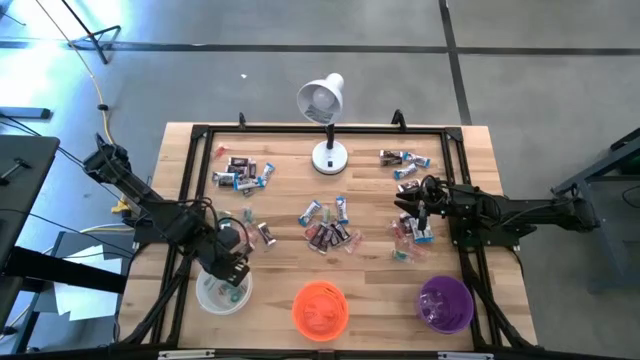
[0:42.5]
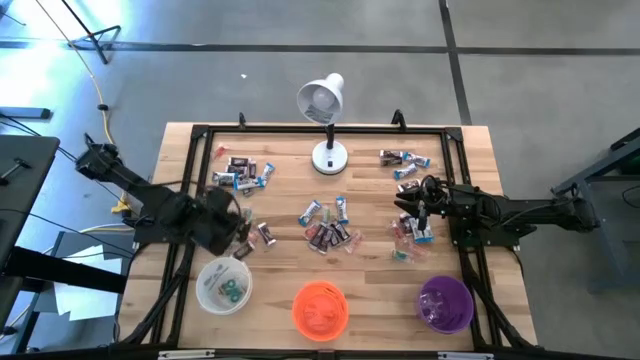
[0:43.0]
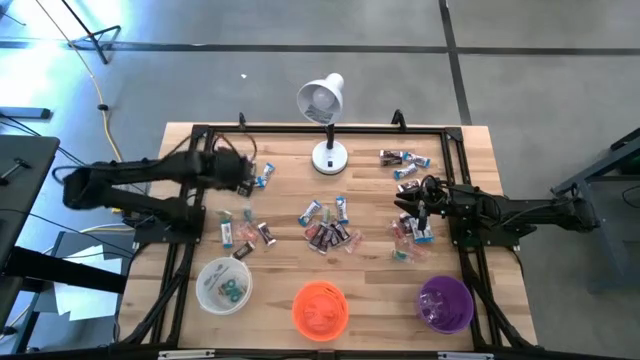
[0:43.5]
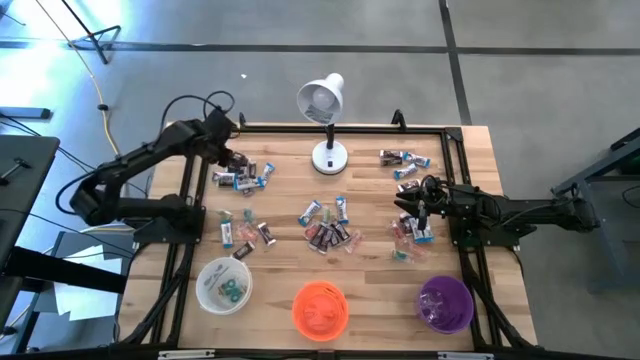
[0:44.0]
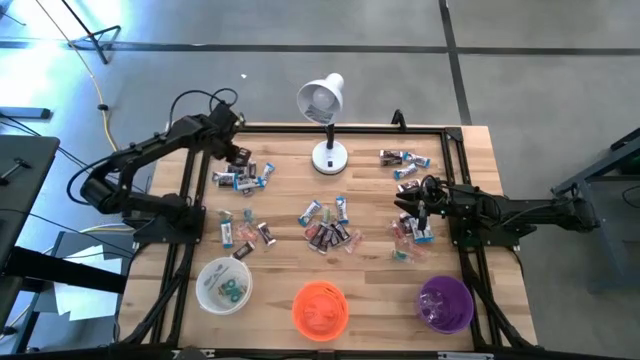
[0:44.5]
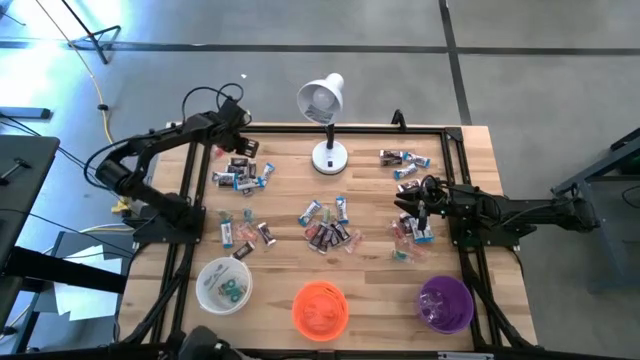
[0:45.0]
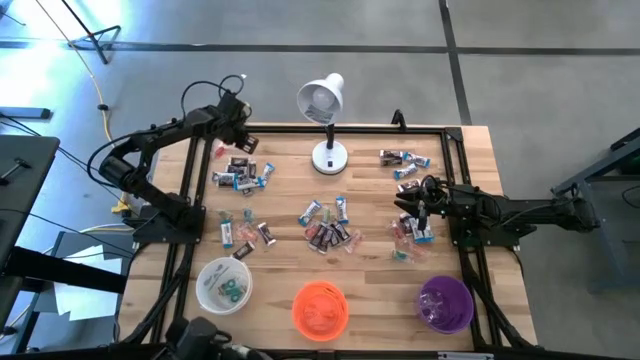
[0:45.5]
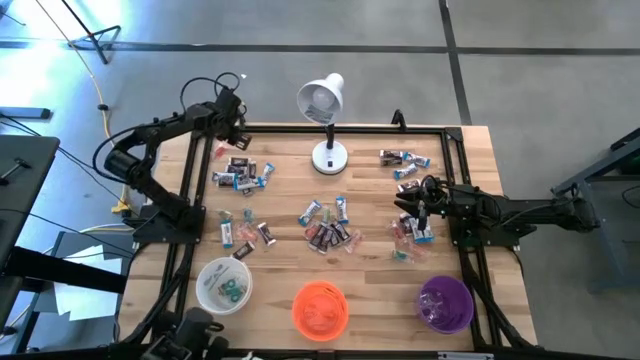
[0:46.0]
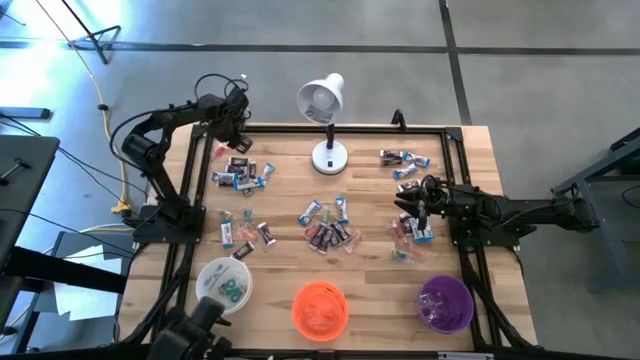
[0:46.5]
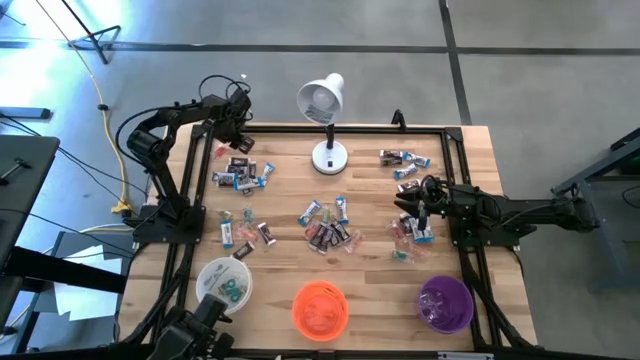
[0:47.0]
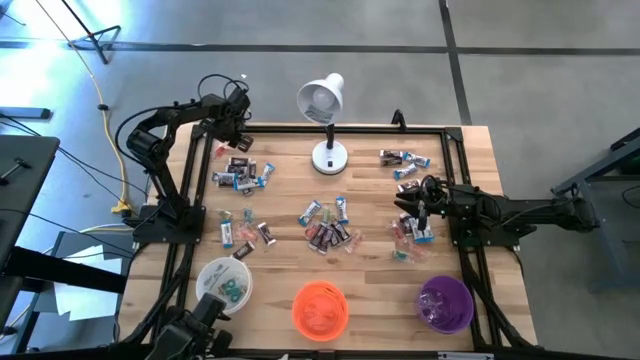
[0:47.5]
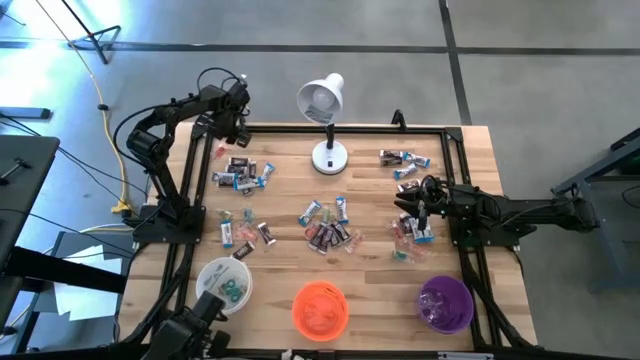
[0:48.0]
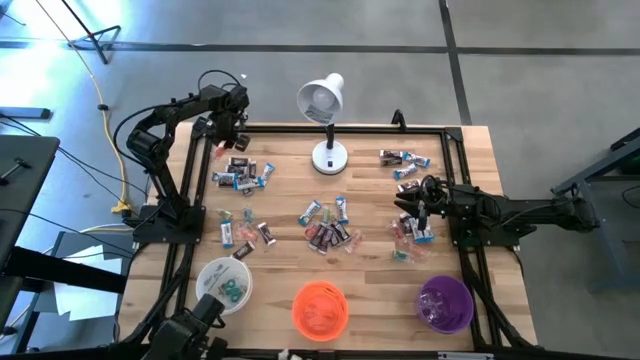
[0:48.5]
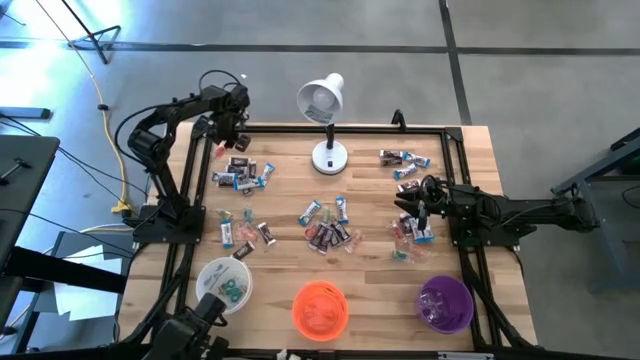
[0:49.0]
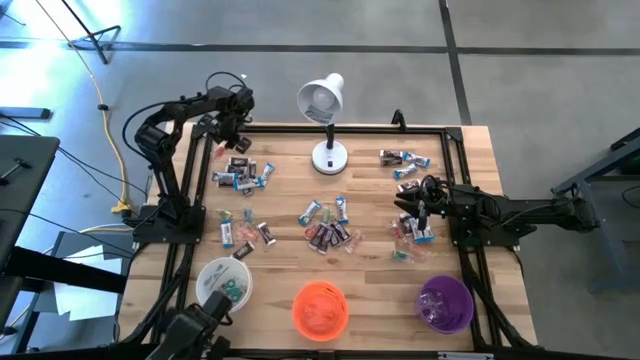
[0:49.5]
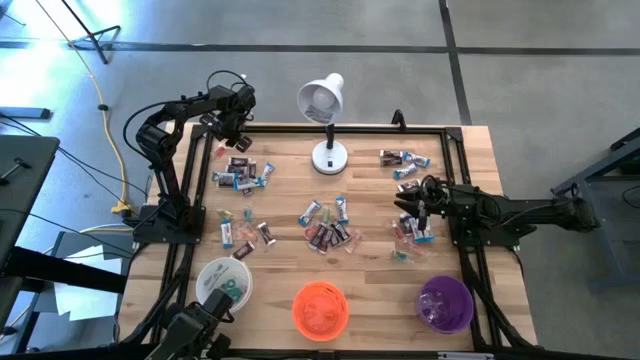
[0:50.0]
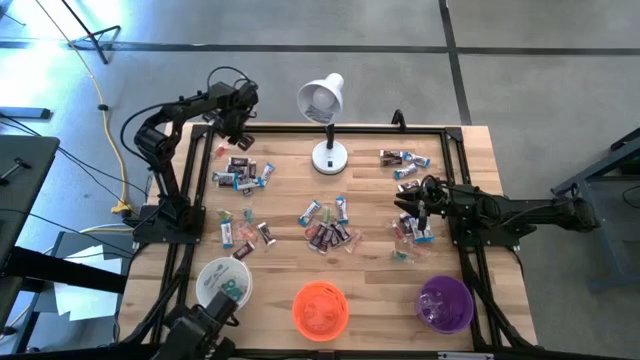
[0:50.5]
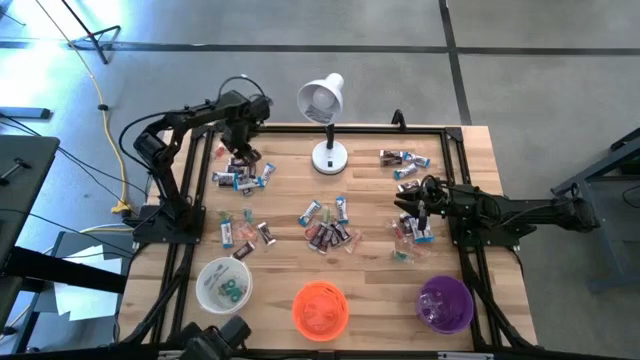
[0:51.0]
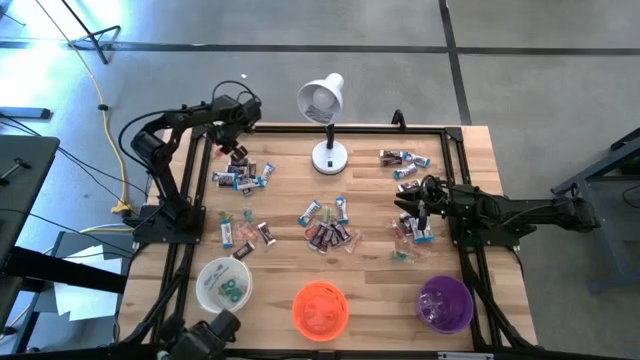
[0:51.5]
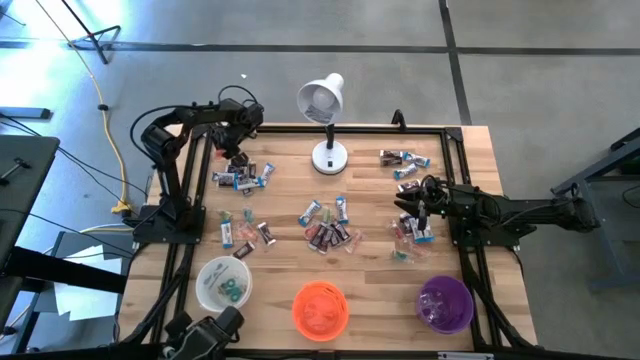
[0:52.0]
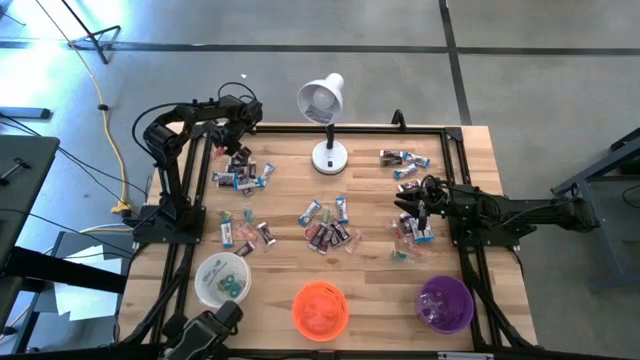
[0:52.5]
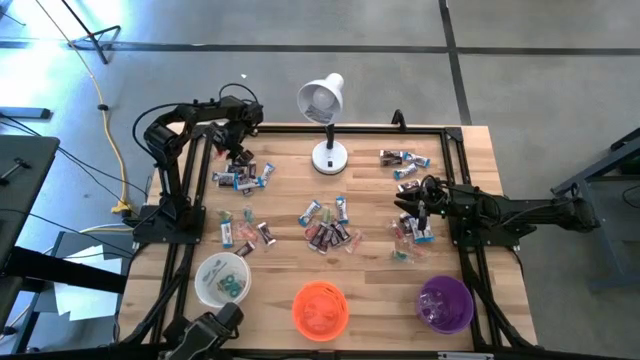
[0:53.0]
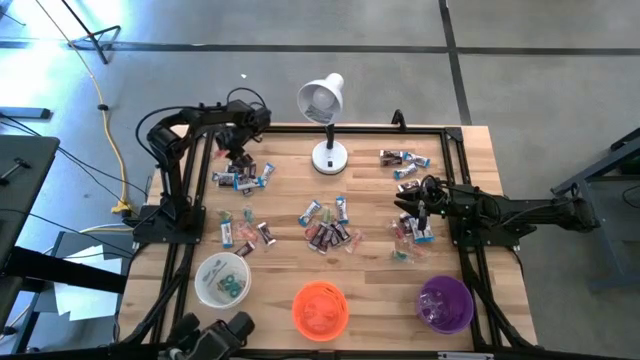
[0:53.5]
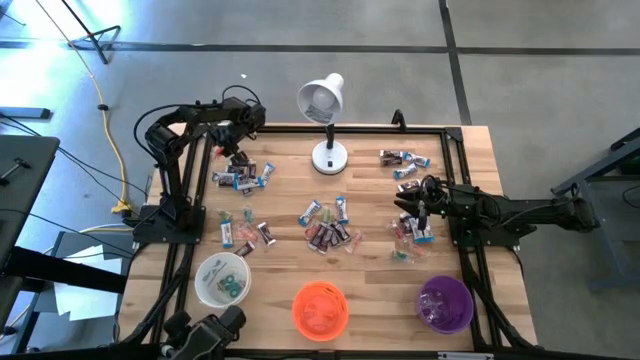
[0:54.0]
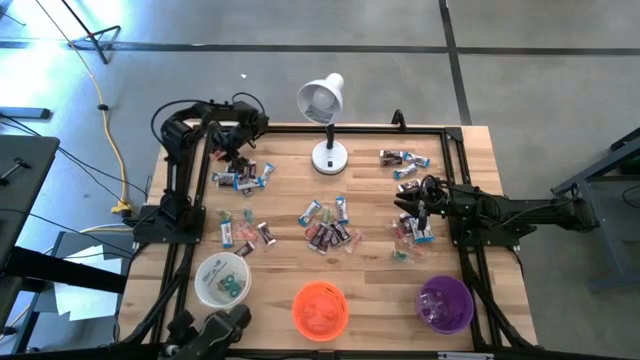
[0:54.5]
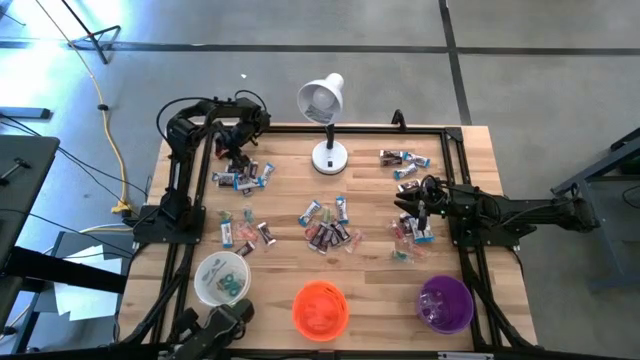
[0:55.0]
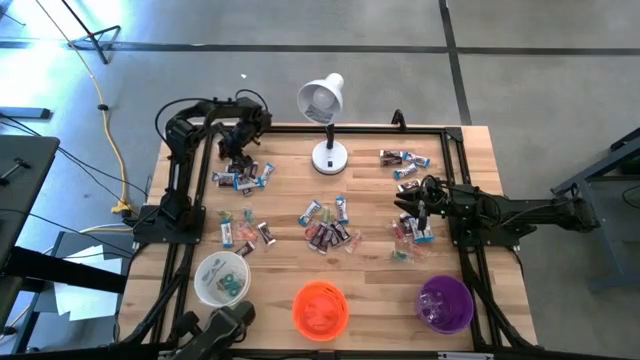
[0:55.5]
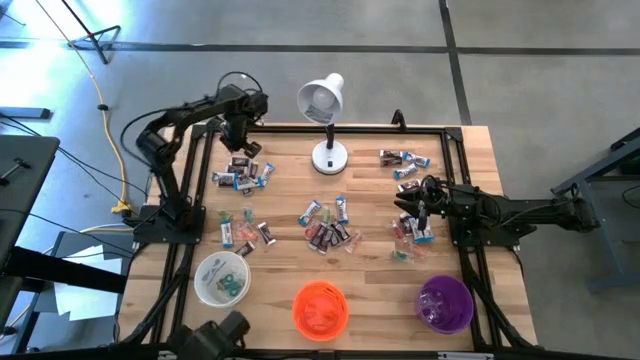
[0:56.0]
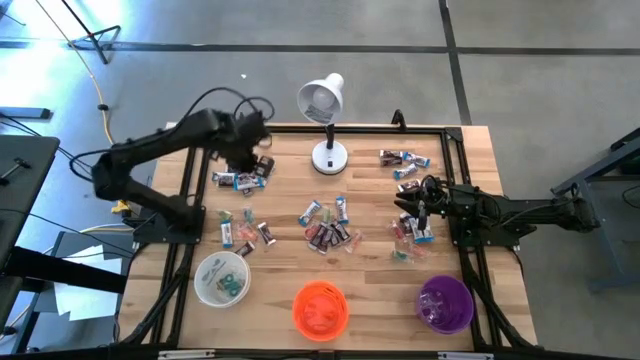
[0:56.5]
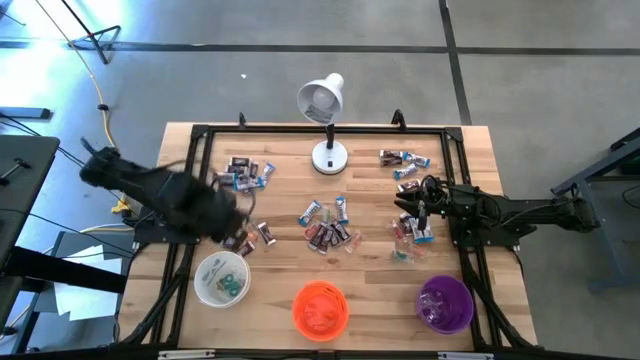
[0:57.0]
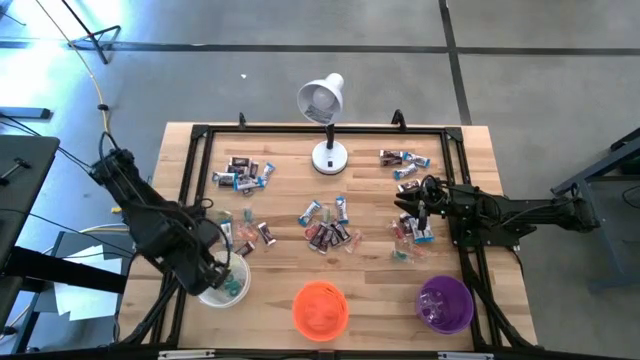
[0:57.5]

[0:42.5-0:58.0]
Task: Organize candy in baskets
Put the red gummy into the white bucket

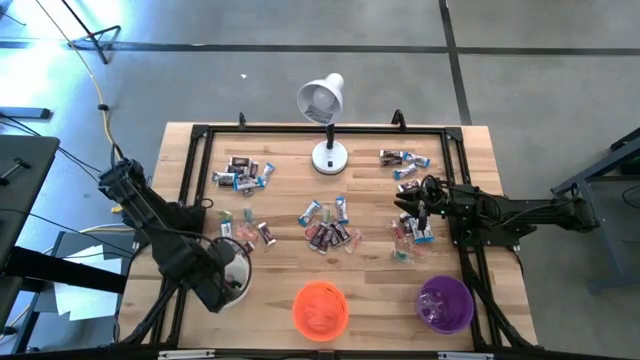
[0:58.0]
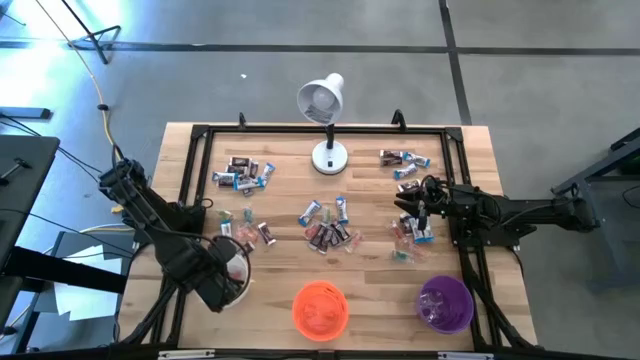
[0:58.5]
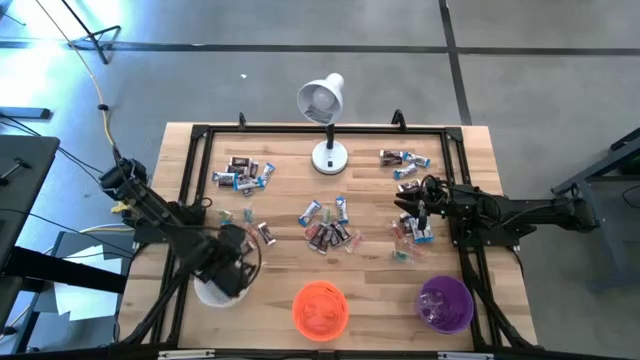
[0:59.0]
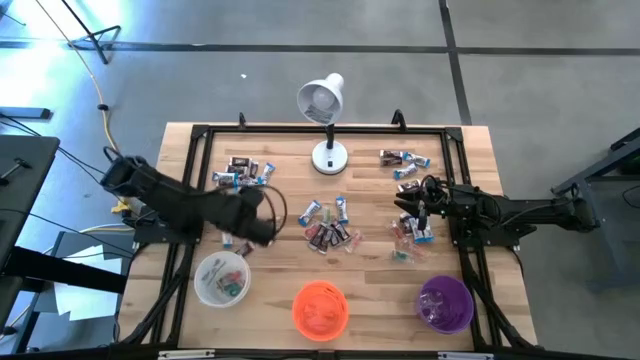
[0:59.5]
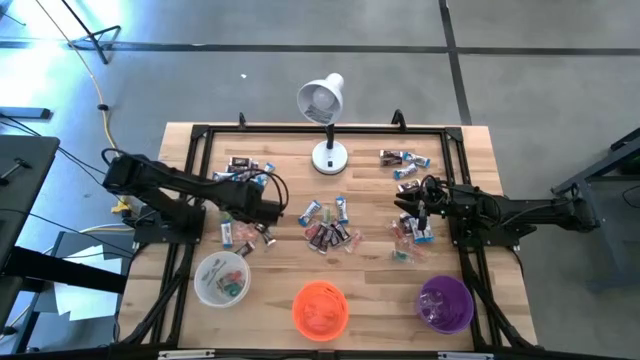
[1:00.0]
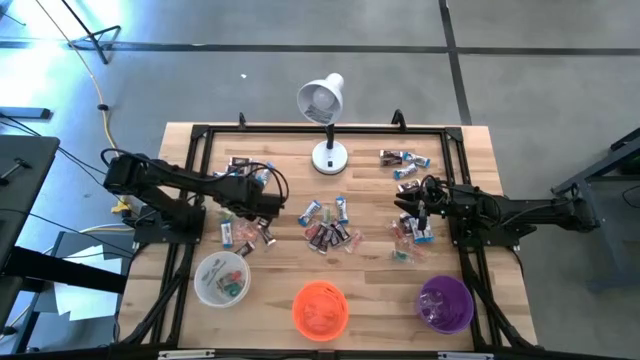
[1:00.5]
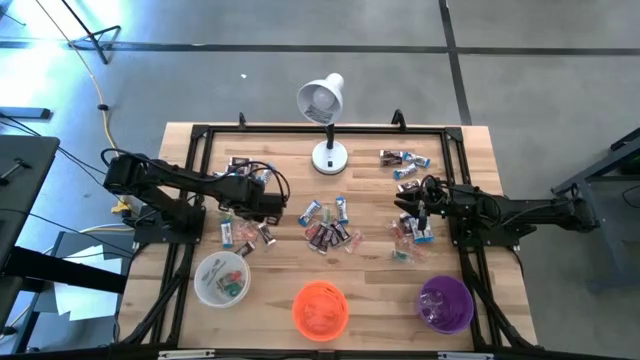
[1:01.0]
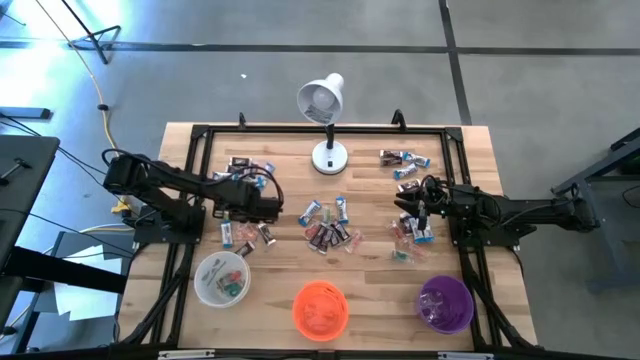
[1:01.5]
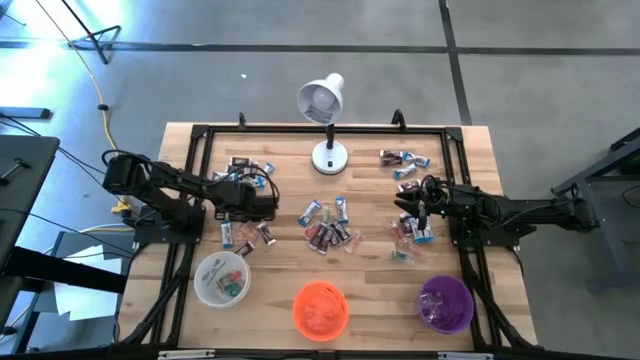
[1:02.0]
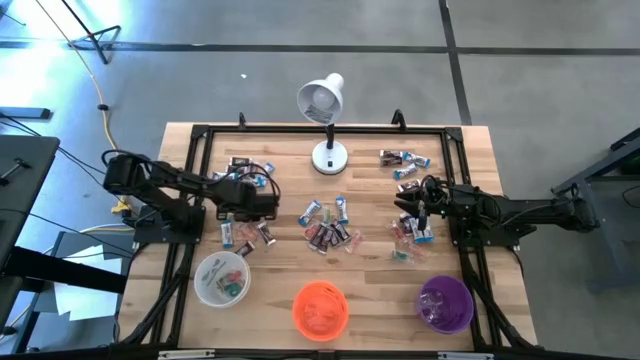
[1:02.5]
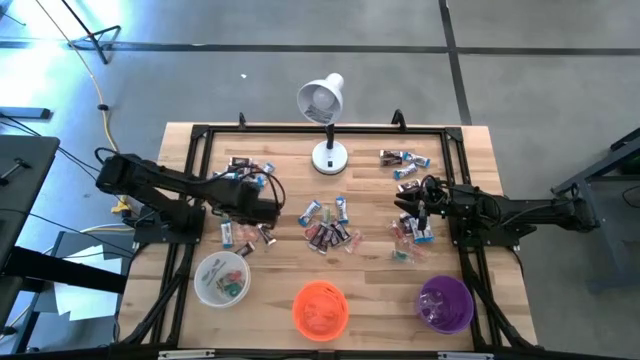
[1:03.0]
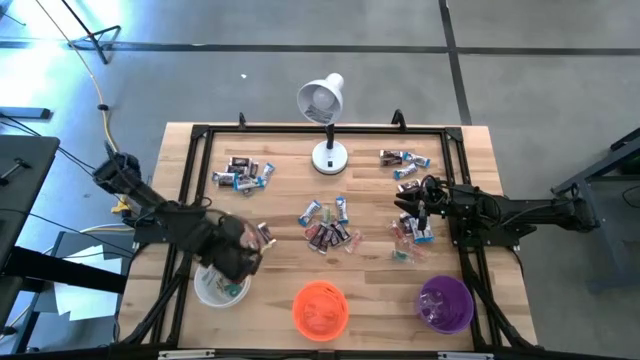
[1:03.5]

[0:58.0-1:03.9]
Put the blue gummy into the white bucket

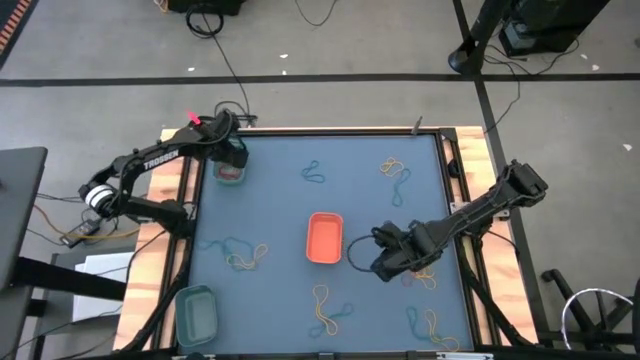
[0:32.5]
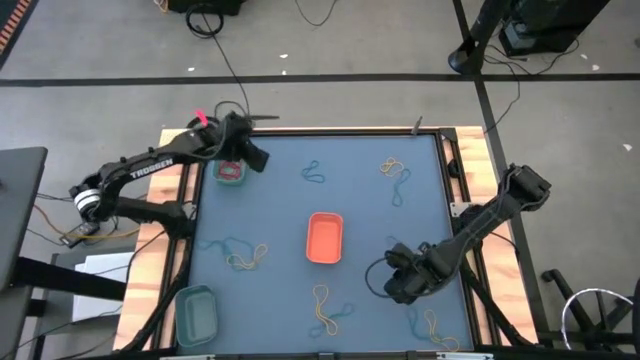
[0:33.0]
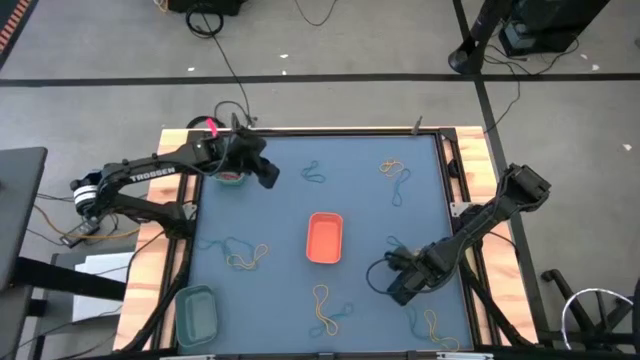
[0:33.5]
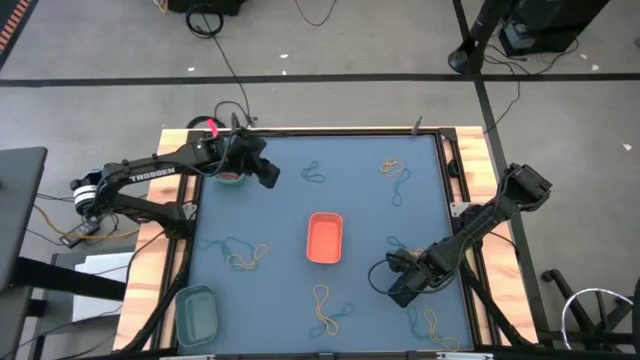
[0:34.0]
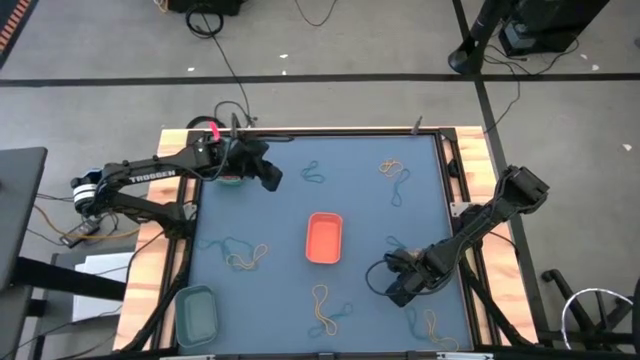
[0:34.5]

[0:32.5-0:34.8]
Task: Sort rubber bands into baskets
Put the red rubber band into the green bin
